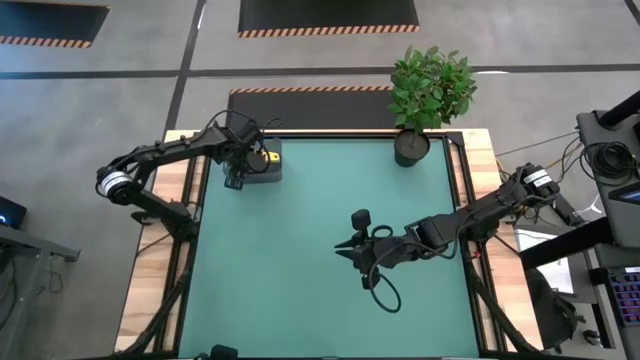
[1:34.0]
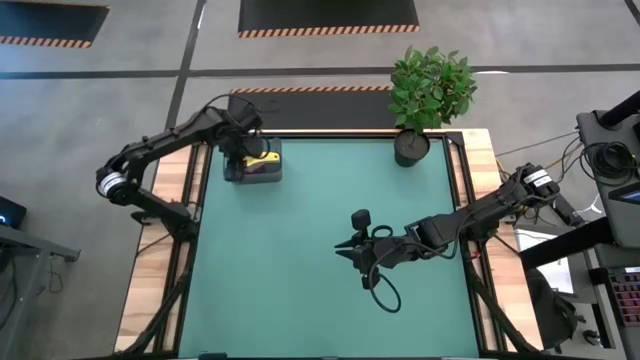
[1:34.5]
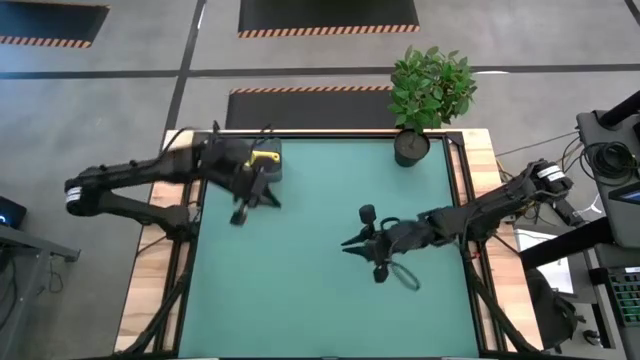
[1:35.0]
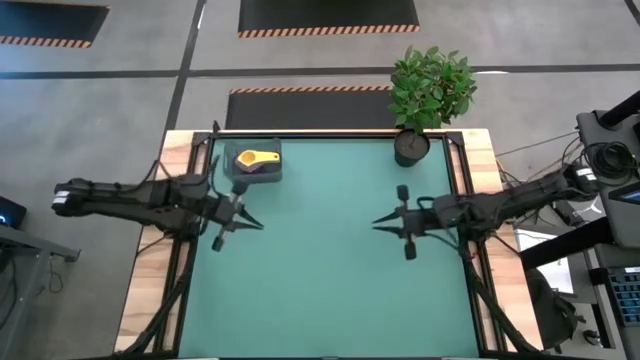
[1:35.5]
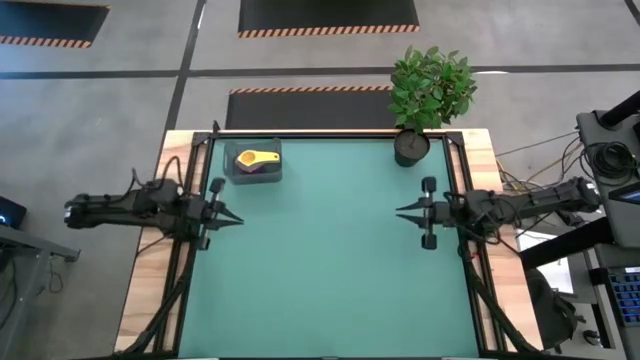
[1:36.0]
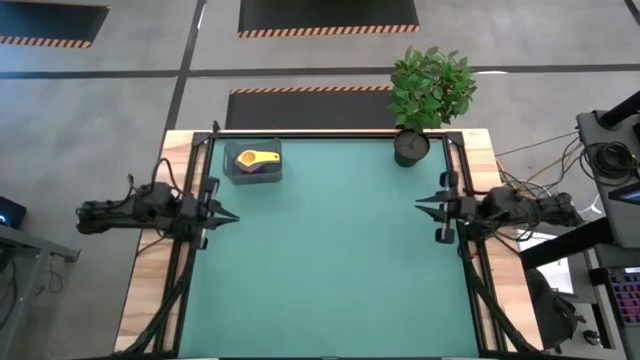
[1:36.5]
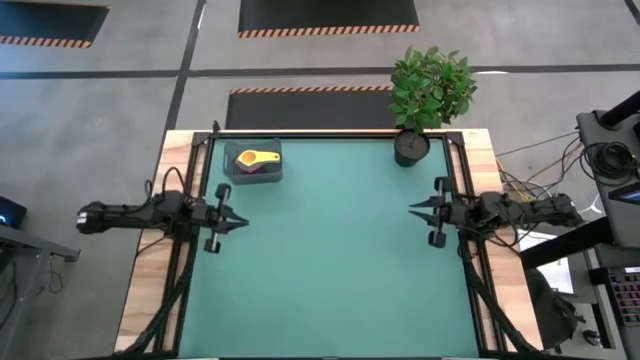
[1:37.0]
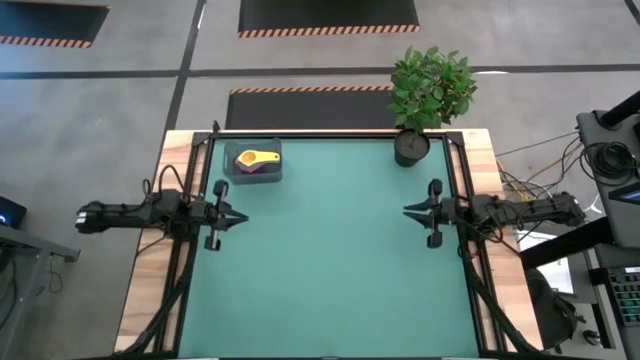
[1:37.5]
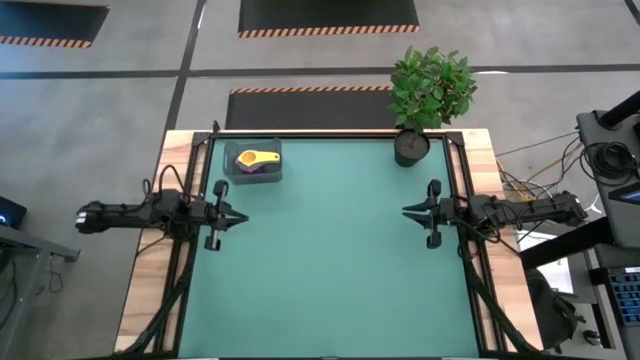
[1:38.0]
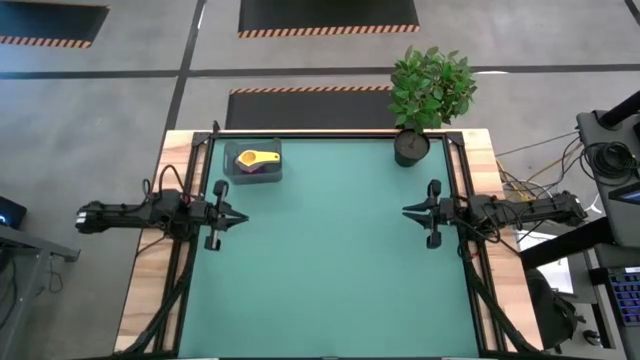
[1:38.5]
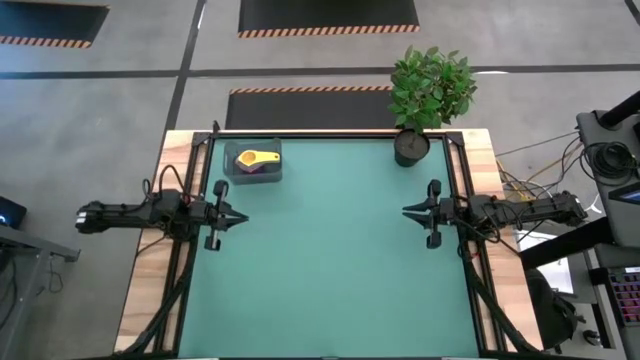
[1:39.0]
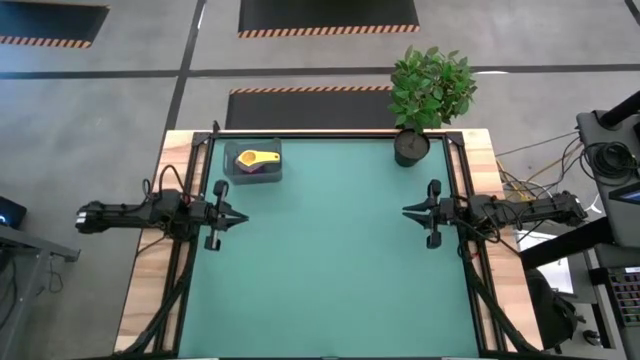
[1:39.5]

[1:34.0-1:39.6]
Task: Nest measuring cups in basket
Return to Home Position

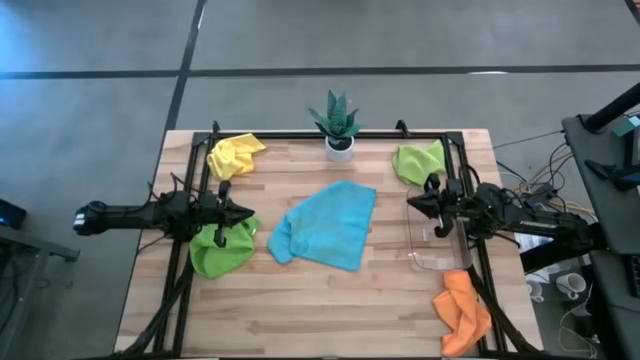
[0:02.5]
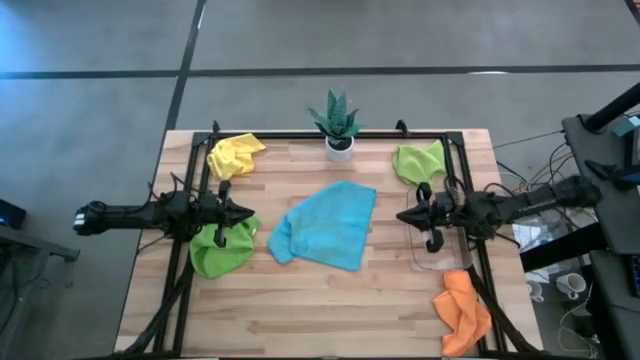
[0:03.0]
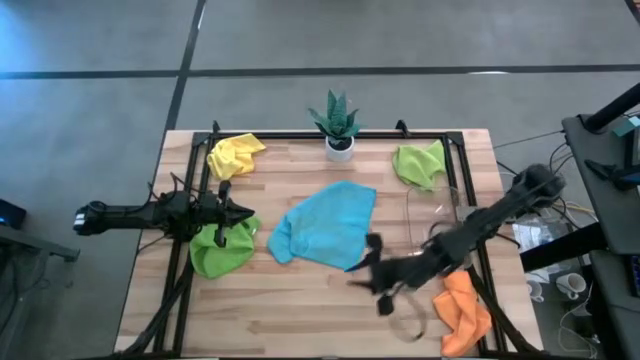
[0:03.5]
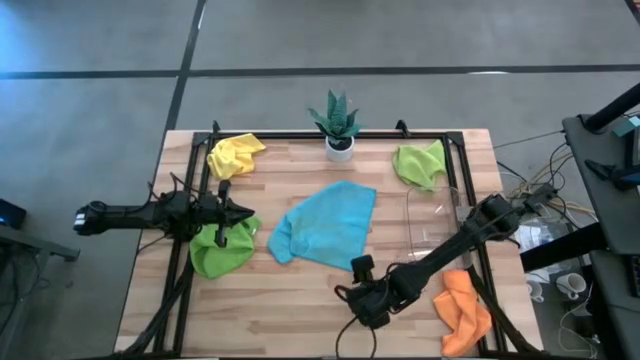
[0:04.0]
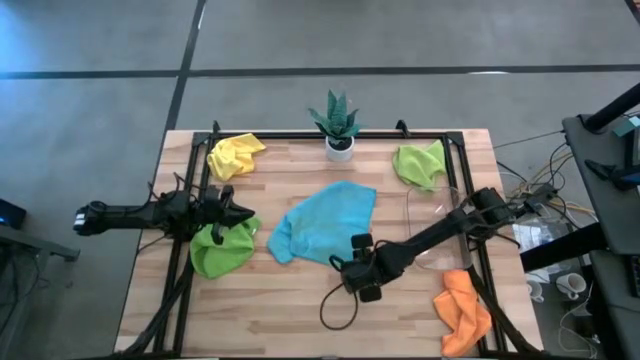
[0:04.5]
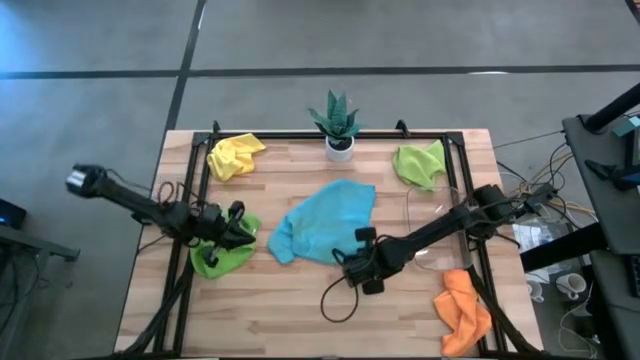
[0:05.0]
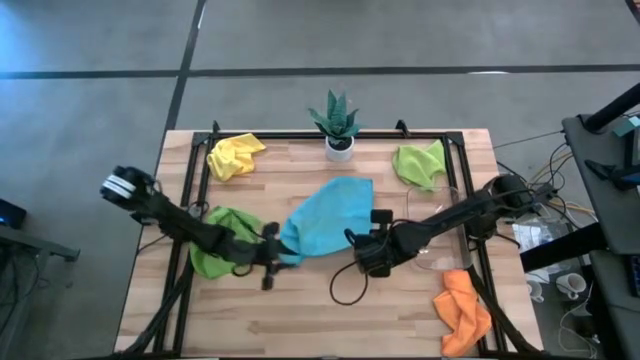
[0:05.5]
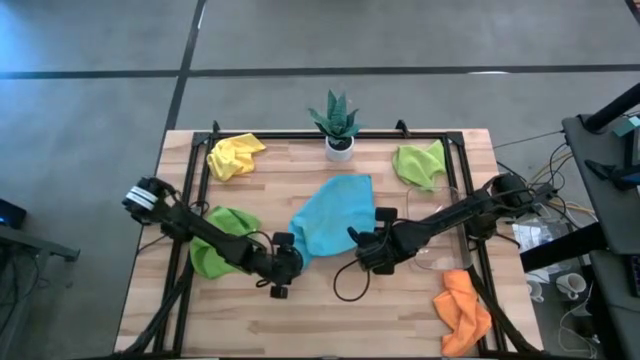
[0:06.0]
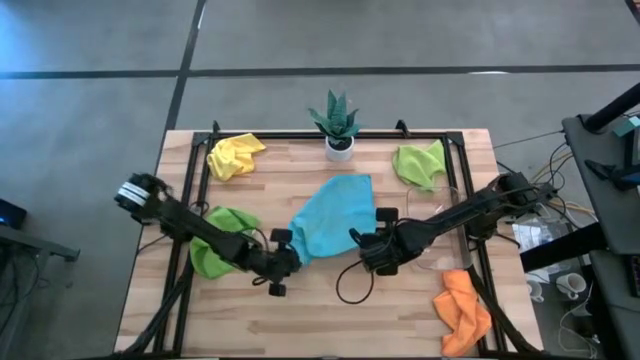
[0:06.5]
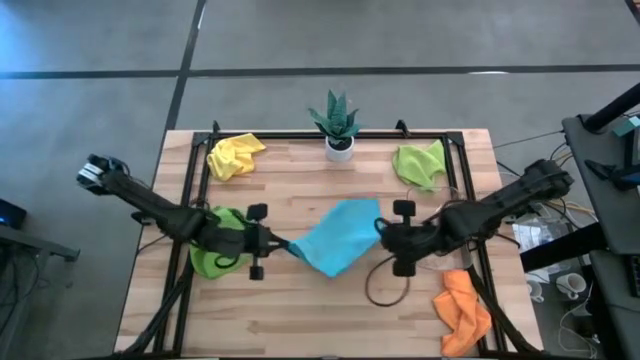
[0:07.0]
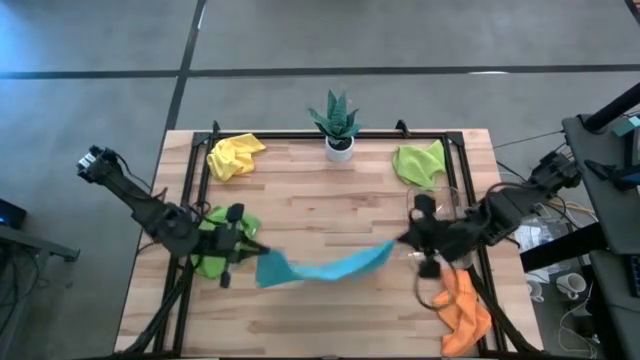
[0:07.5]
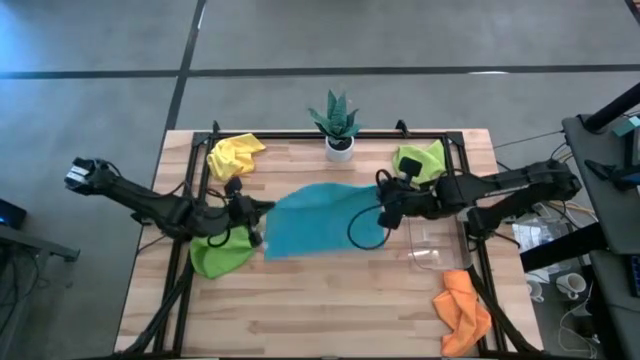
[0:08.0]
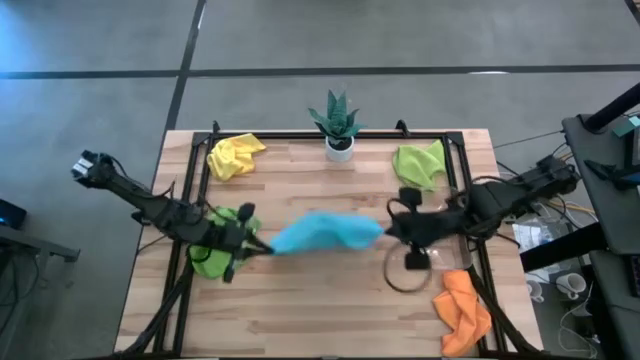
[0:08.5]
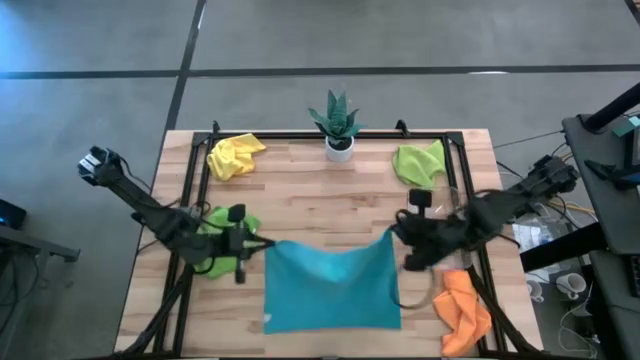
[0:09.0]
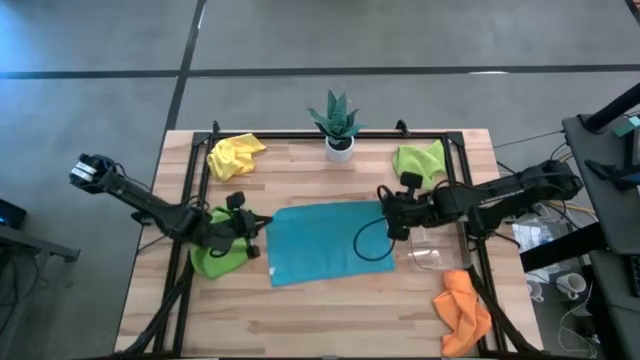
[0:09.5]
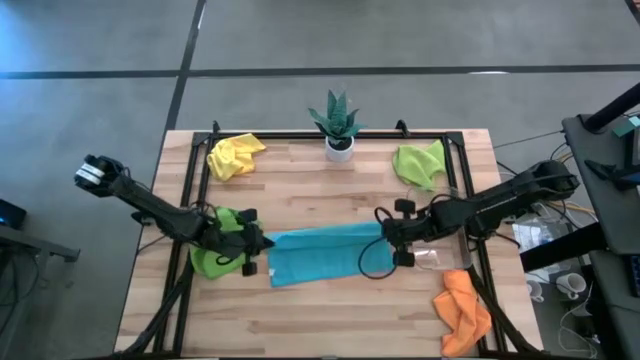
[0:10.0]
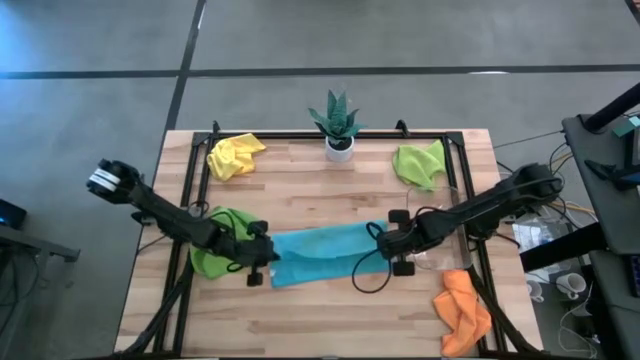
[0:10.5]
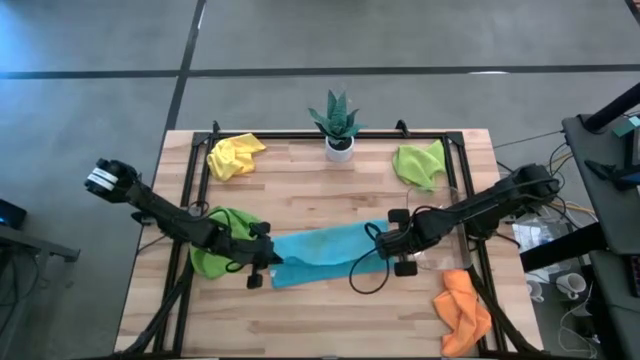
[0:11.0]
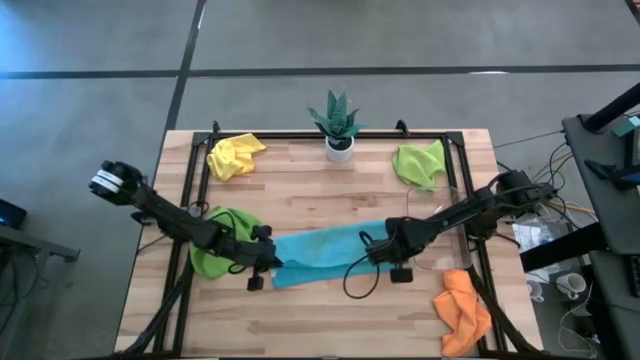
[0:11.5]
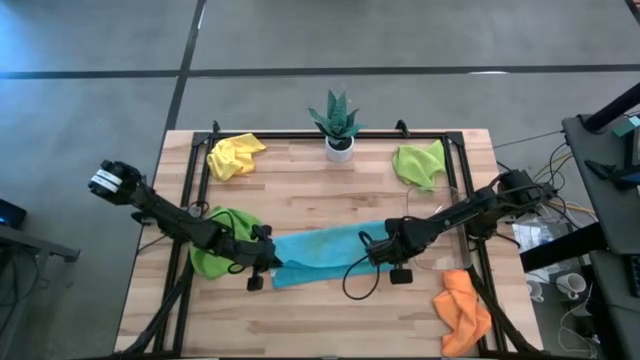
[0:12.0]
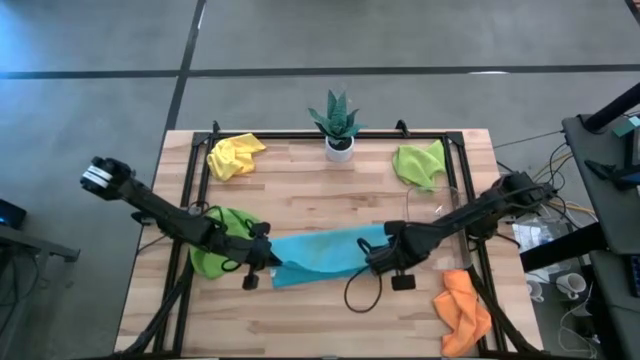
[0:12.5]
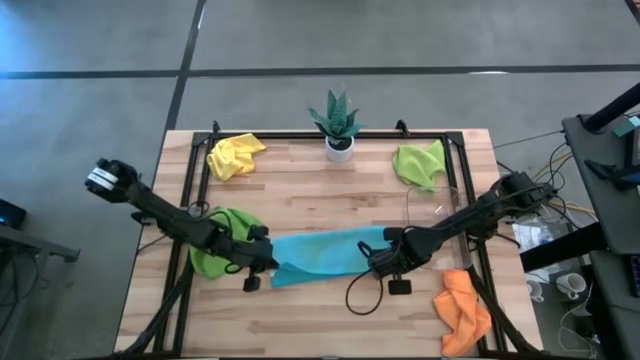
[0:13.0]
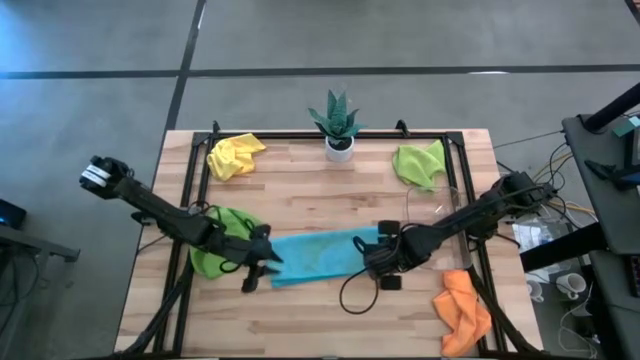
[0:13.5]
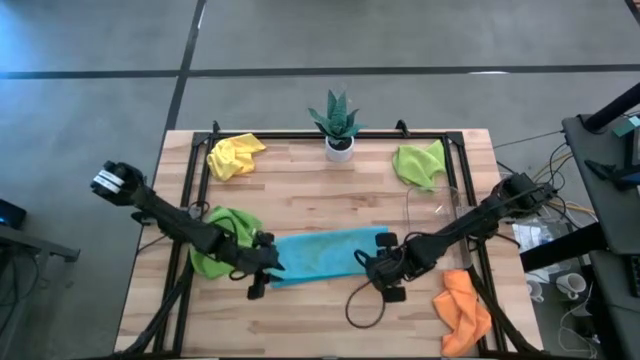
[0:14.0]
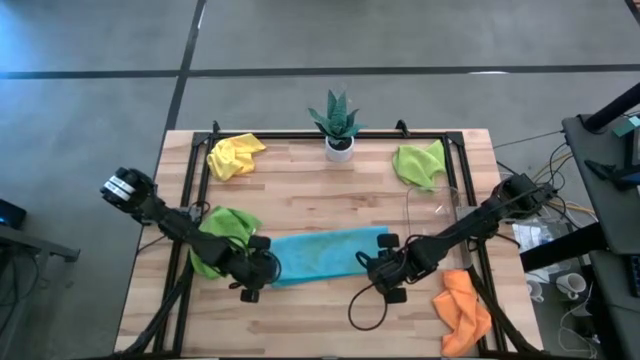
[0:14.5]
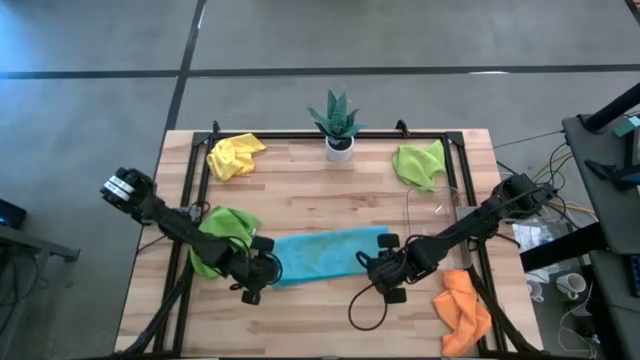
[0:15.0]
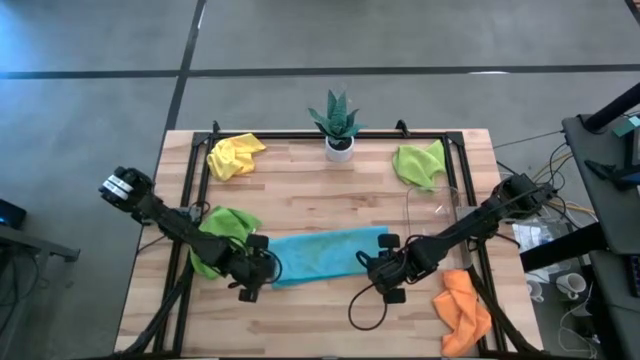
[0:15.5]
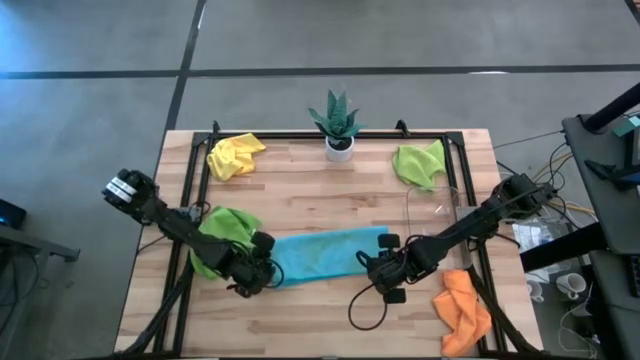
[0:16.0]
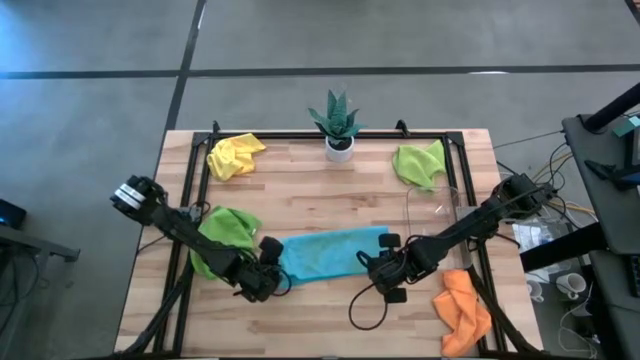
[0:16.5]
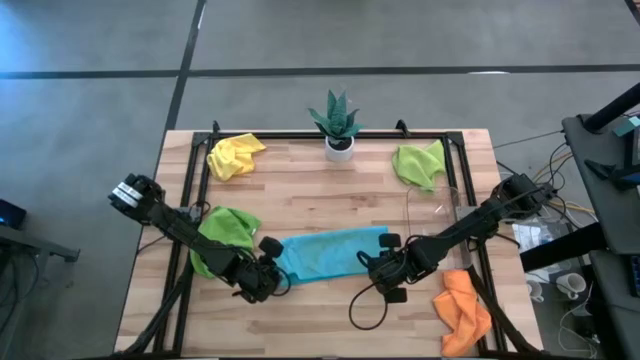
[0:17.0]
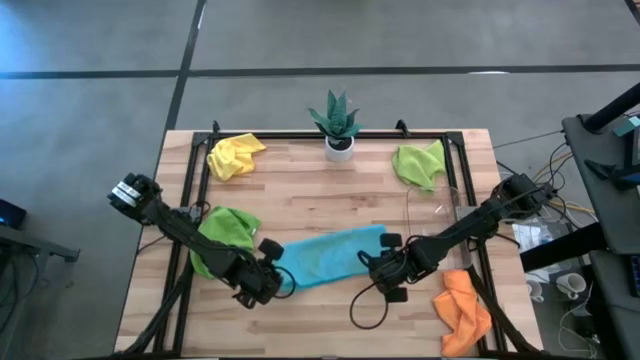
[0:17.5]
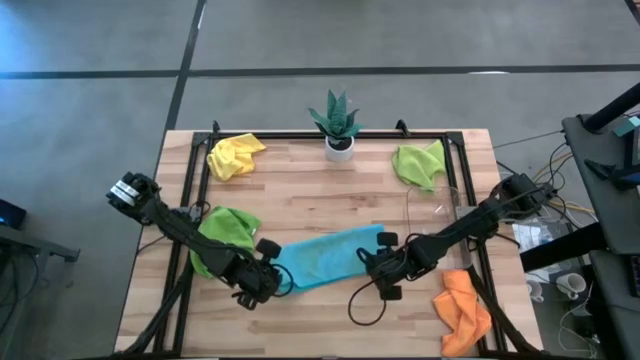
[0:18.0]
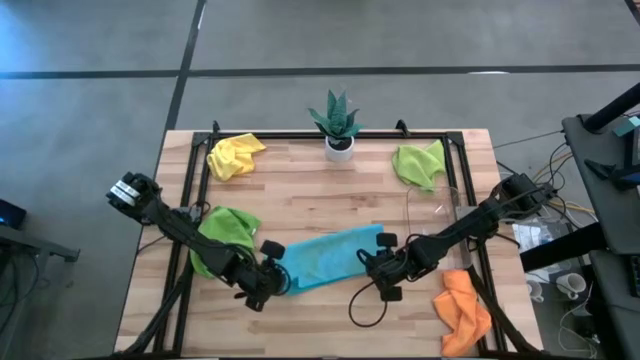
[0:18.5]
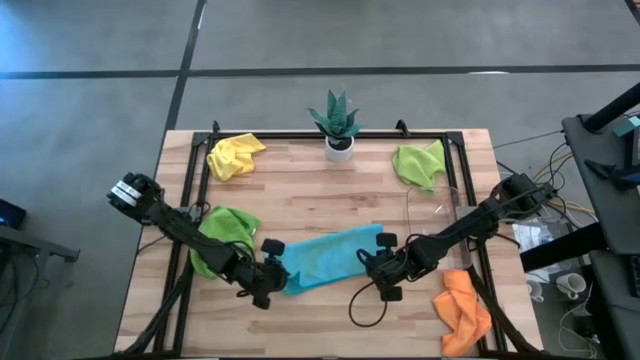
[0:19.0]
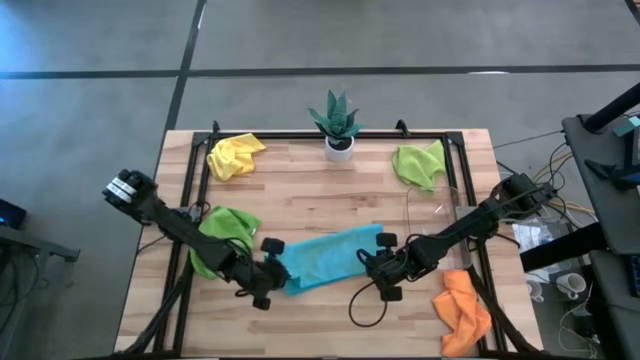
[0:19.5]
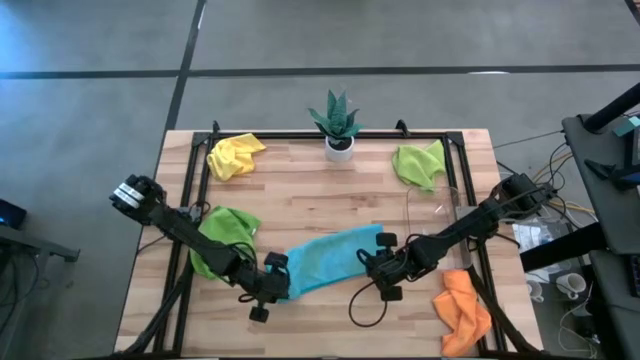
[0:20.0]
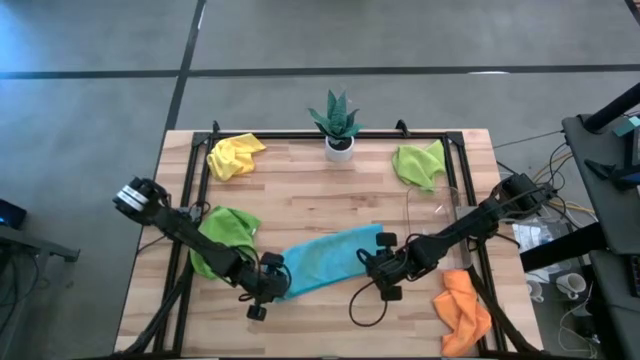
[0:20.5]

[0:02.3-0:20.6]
Task: Fold microfiber towels
Fold the blue towel on the table
